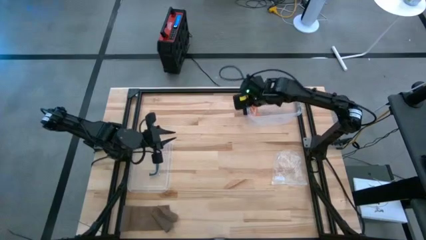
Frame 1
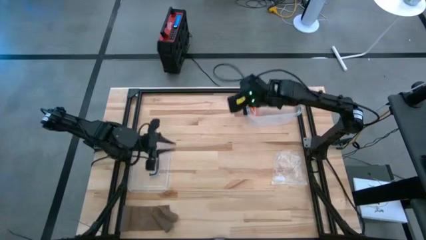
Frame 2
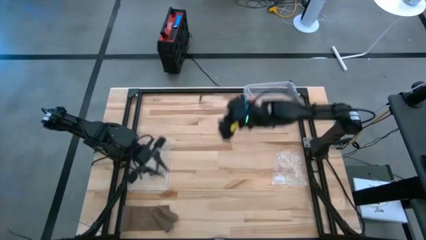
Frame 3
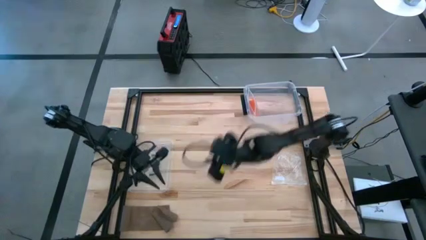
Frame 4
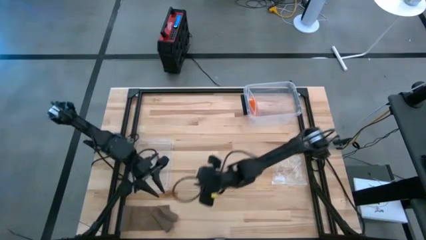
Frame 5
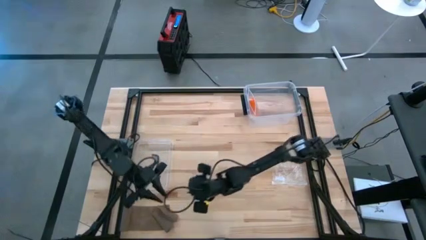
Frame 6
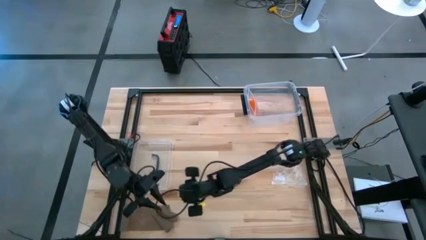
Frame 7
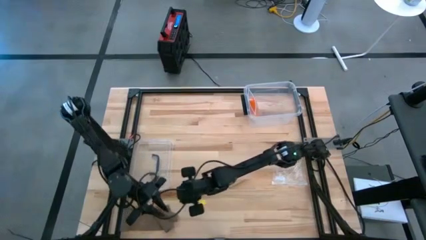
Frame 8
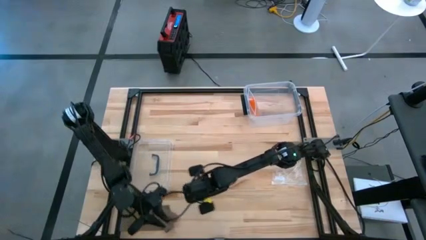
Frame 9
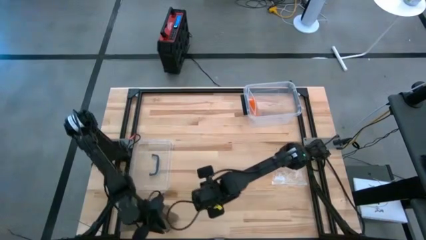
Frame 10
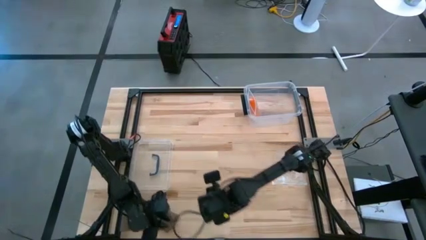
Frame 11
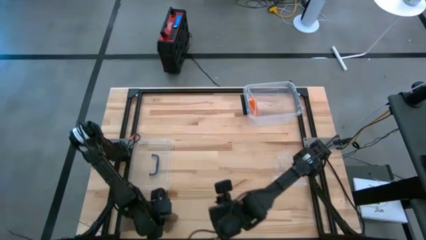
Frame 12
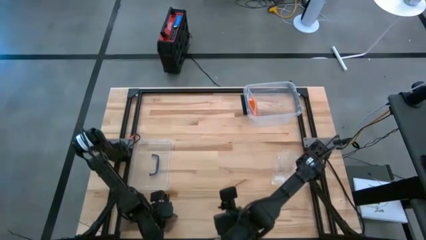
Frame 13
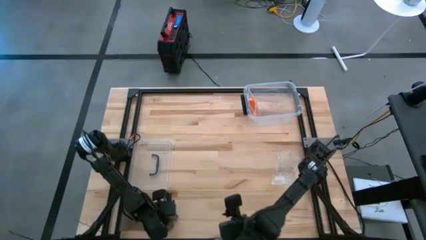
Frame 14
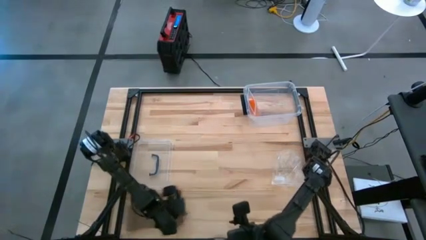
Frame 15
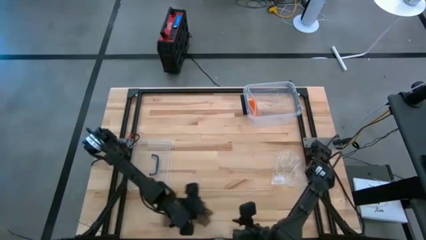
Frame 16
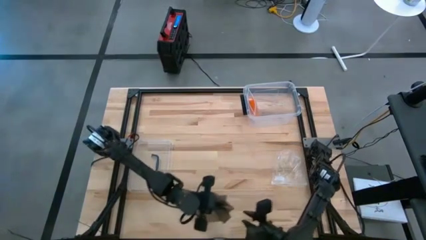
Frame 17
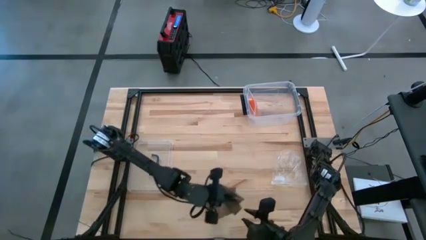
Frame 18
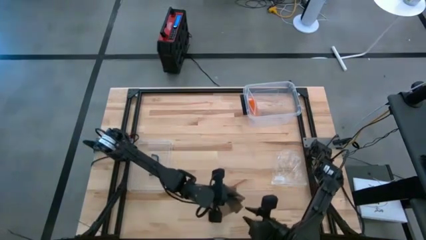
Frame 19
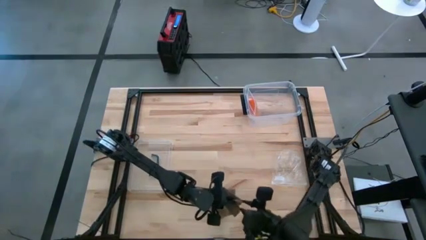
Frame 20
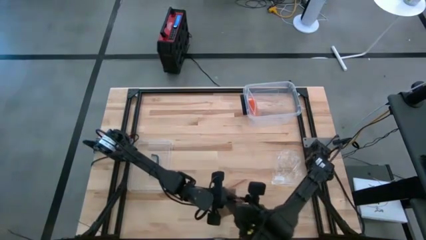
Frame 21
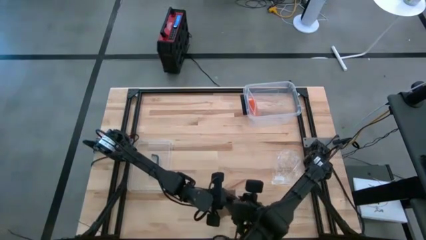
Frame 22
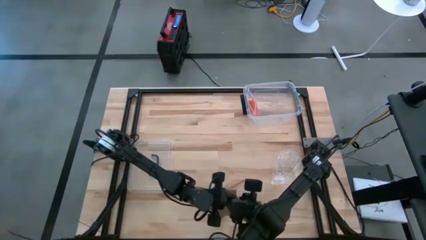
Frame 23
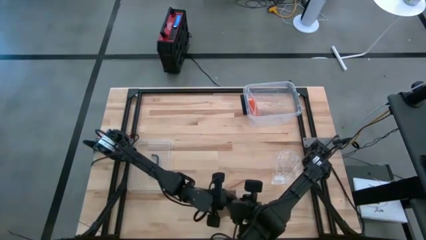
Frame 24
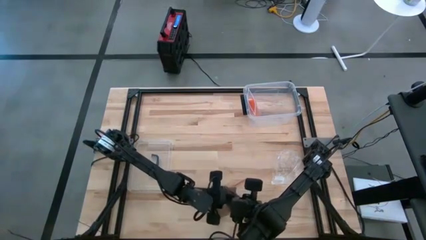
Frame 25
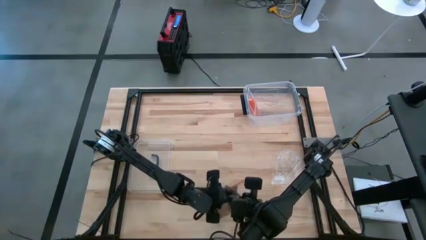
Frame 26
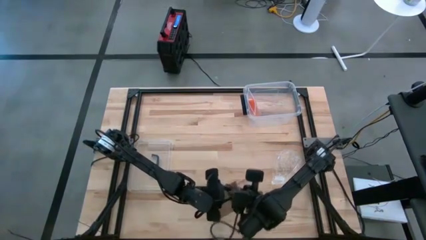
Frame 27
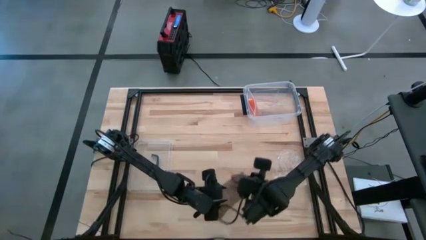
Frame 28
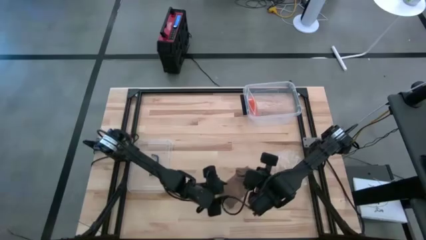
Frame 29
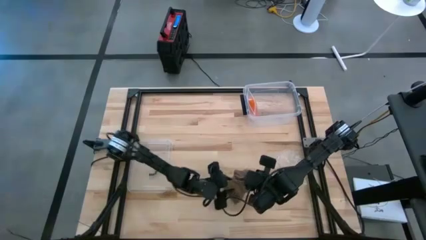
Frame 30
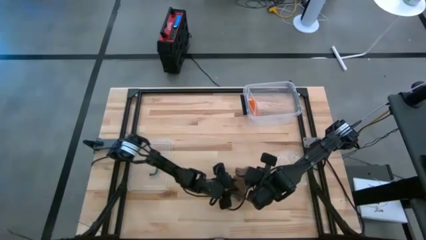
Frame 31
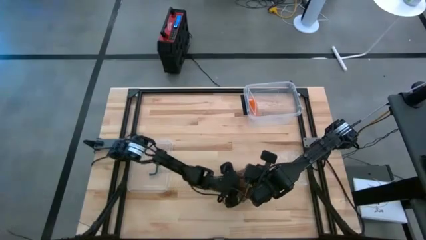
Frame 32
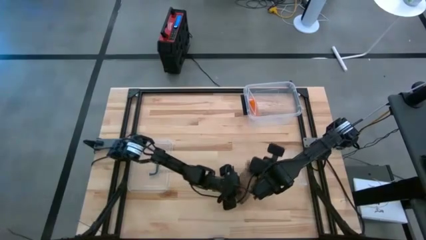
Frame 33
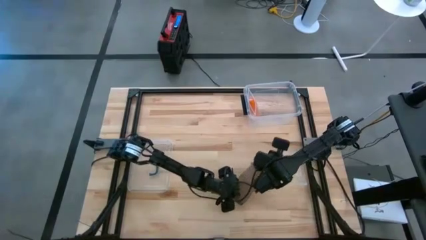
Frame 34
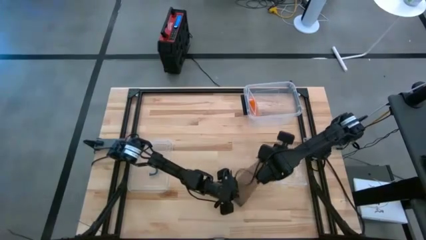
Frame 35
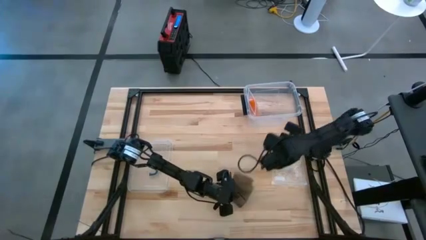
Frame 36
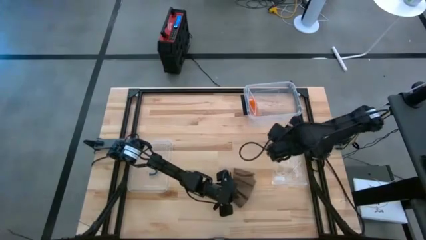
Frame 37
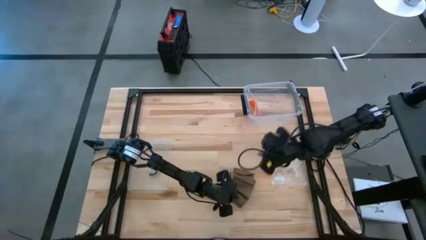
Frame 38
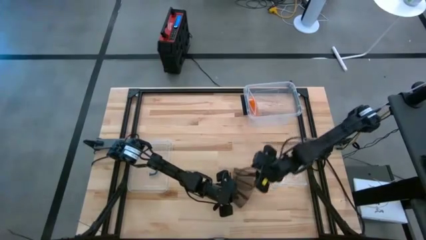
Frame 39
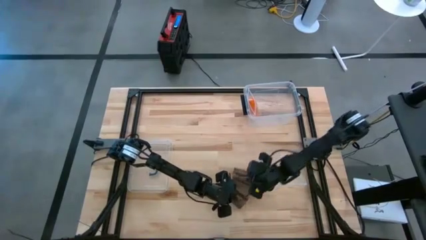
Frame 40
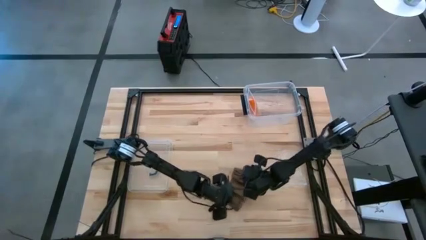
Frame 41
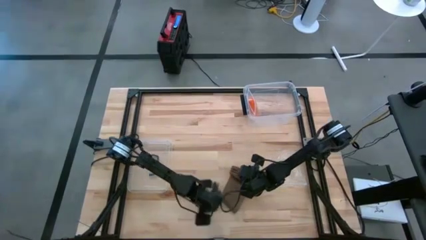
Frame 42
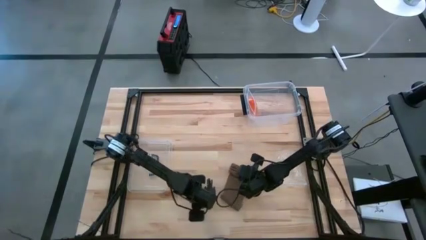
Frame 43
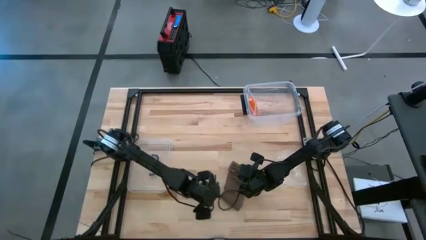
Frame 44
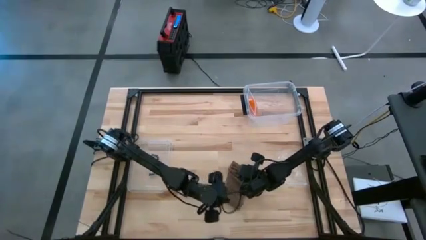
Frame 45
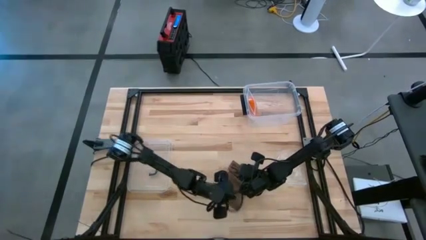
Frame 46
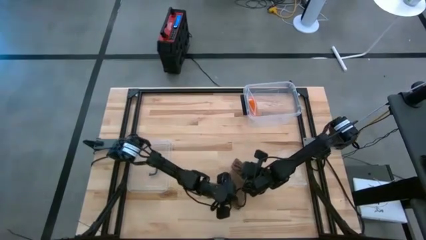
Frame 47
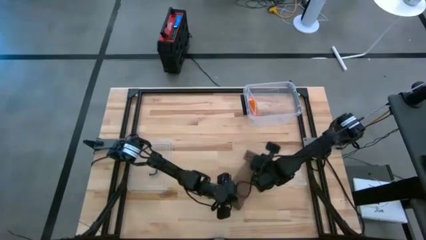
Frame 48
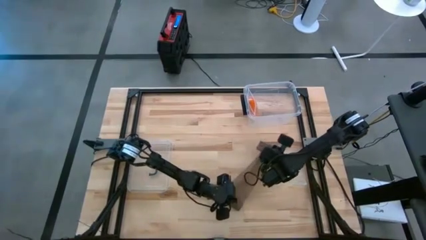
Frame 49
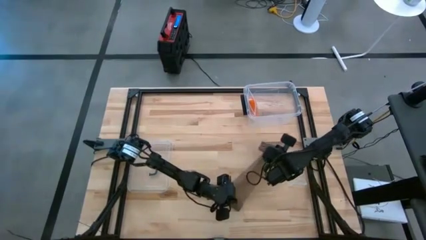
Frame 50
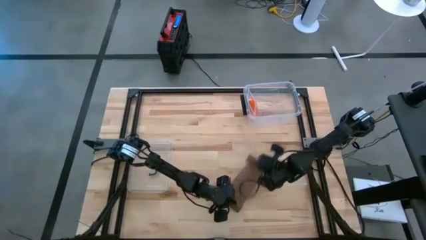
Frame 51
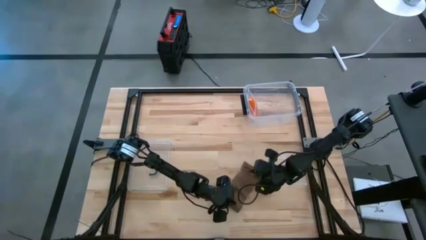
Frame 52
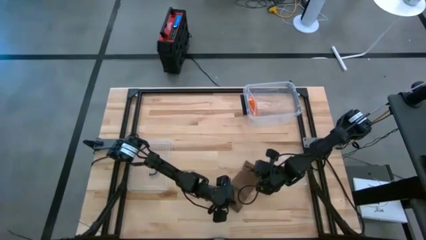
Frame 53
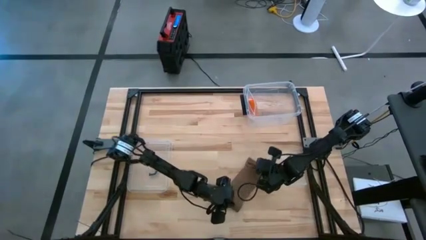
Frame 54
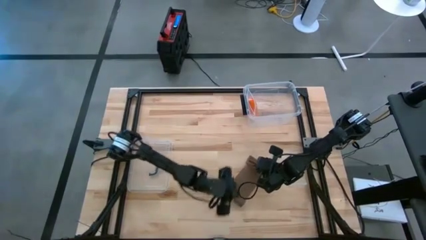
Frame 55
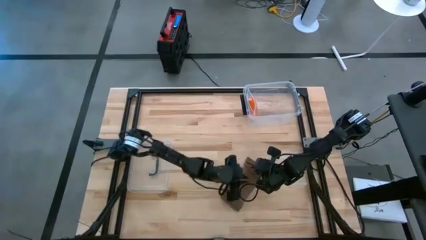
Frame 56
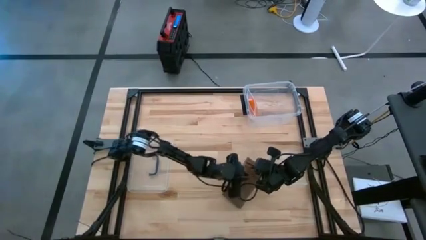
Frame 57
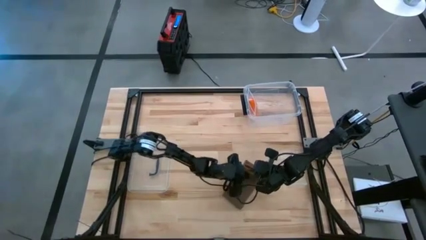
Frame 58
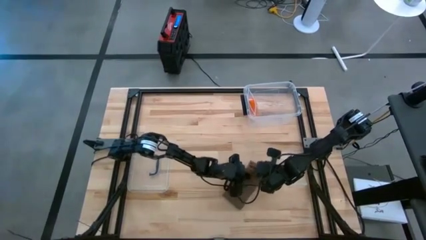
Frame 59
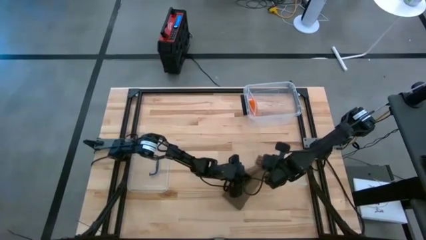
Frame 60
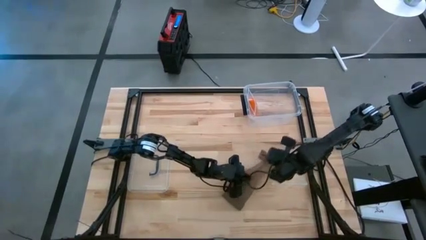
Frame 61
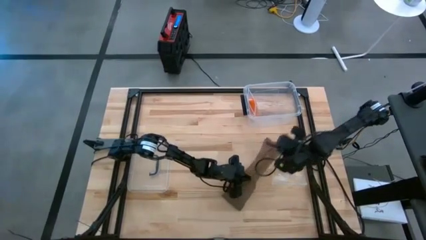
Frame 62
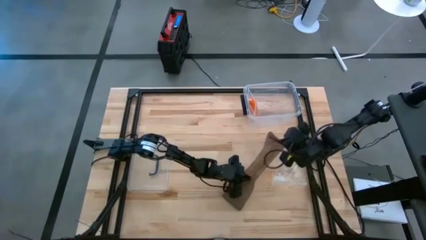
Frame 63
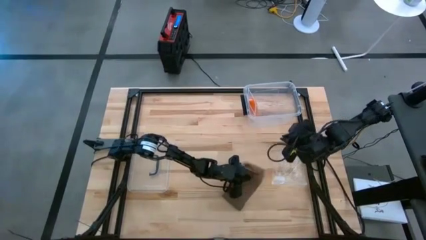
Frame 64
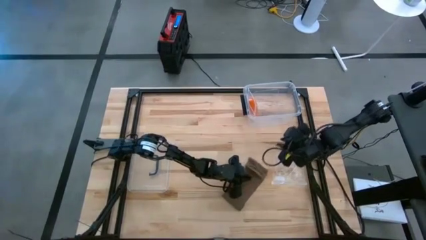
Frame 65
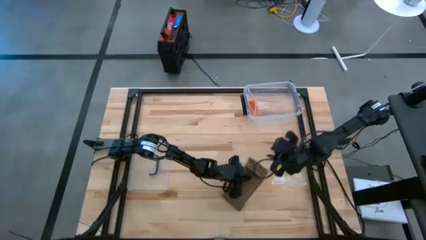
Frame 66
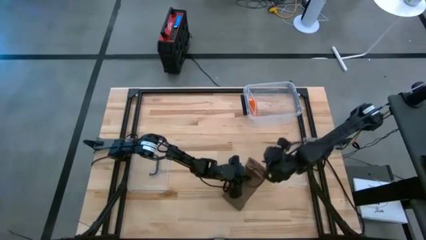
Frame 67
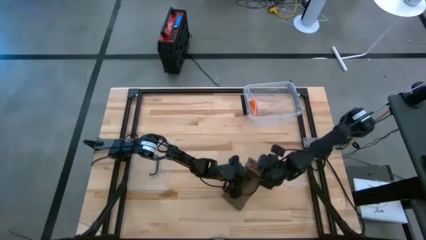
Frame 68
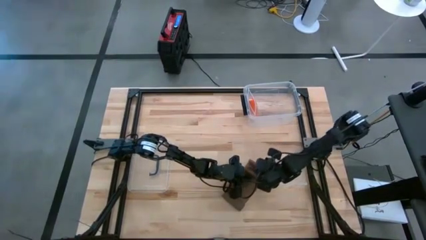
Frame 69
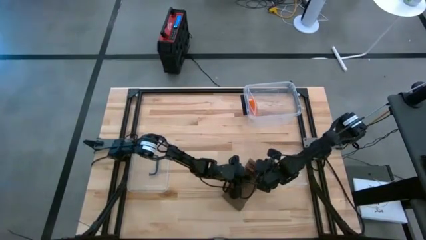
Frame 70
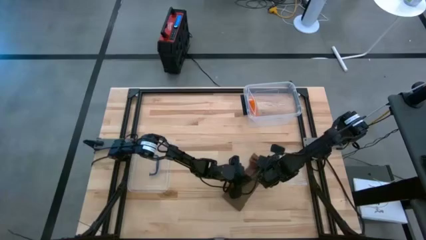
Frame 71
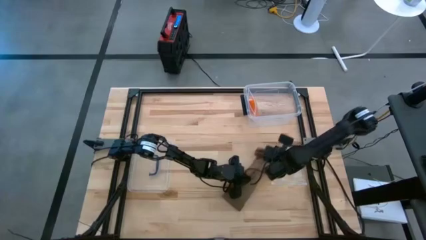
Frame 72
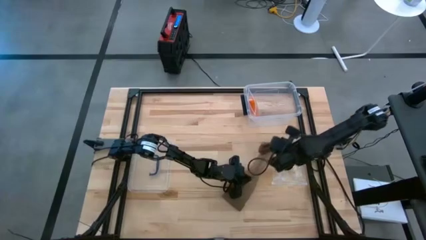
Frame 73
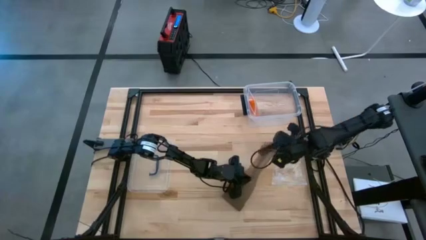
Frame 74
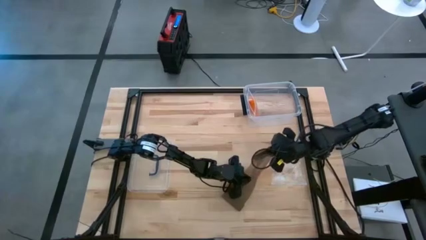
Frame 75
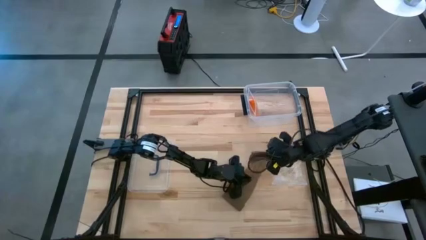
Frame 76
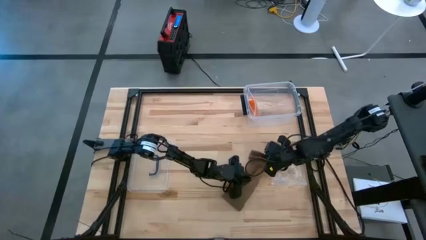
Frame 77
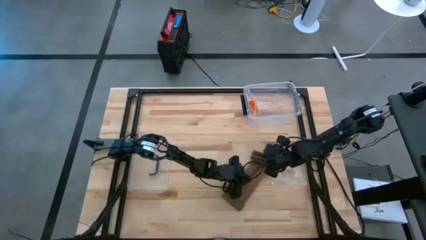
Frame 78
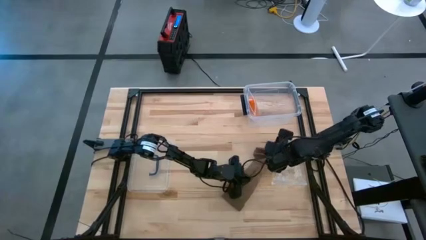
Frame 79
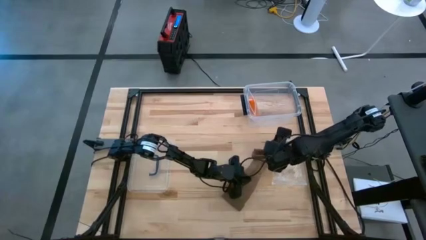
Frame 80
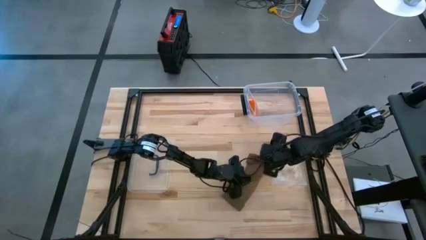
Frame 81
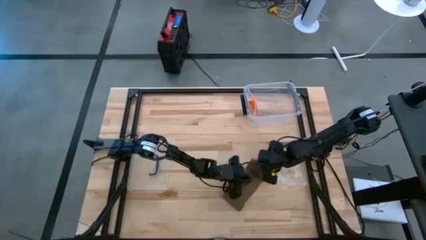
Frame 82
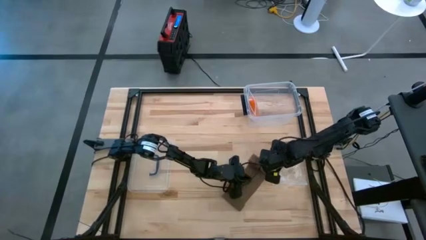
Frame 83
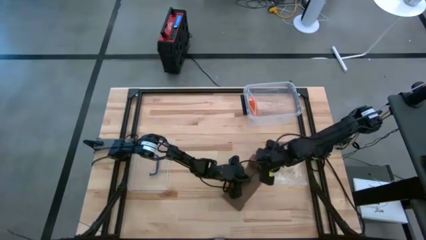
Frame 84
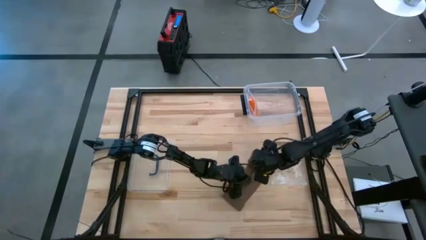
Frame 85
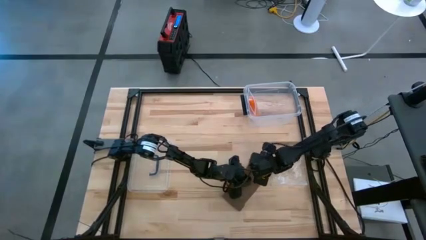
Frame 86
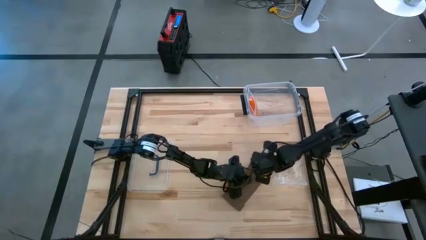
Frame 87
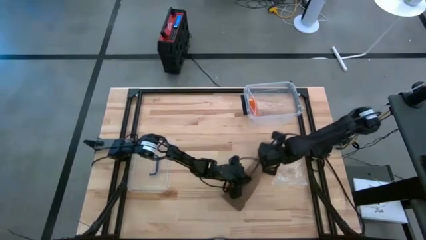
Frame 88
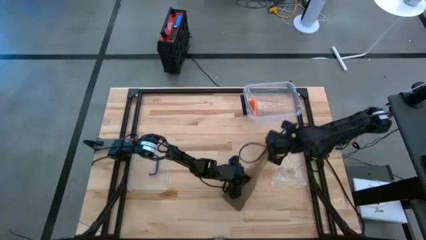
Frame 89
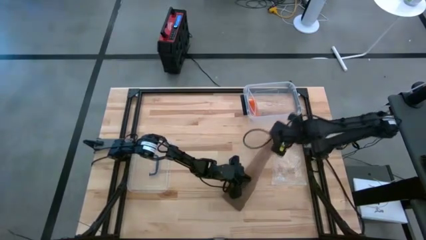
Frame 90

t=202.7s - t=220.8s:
Task: Roll bandage
Roll the brown bandage
